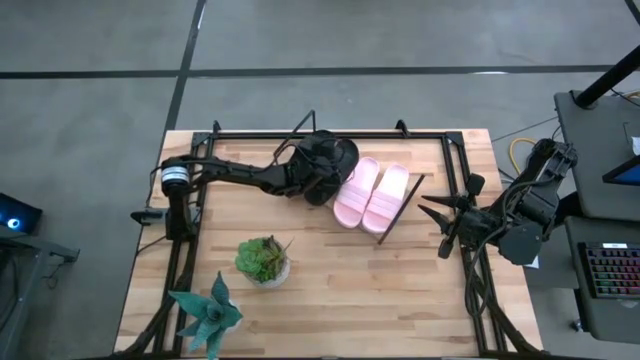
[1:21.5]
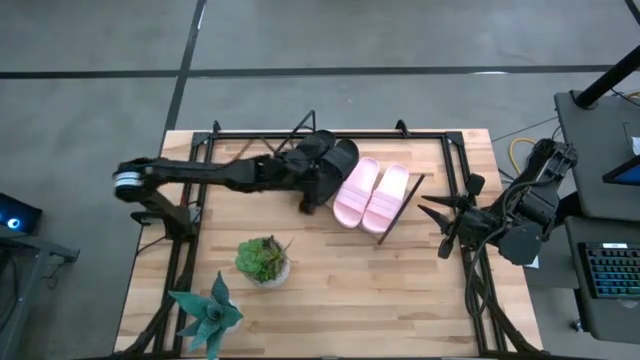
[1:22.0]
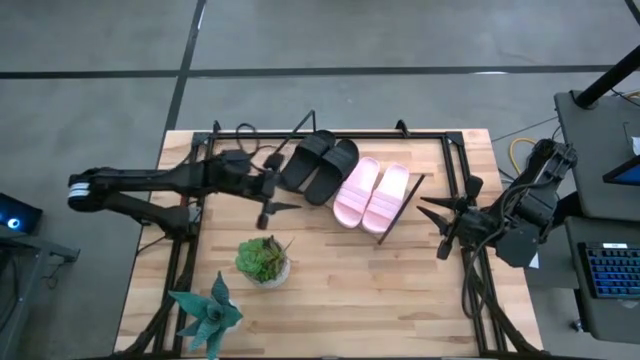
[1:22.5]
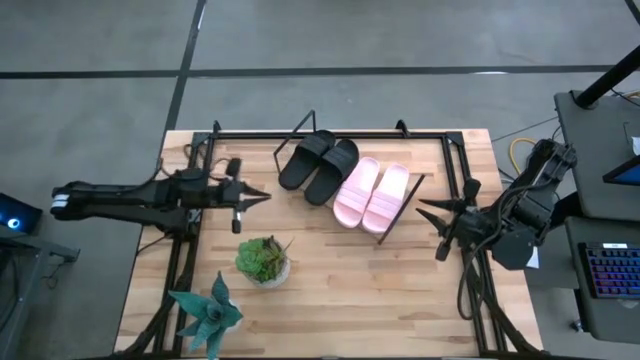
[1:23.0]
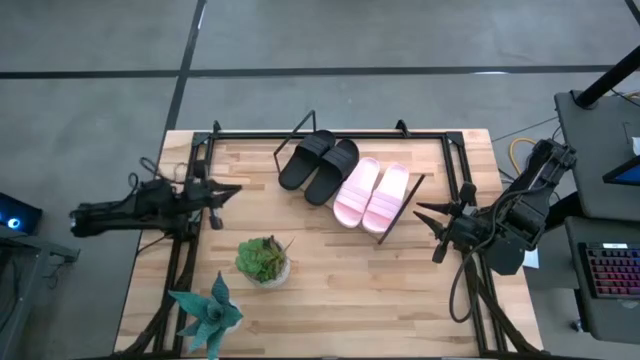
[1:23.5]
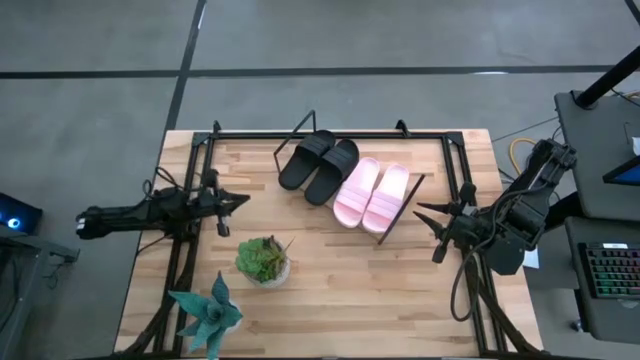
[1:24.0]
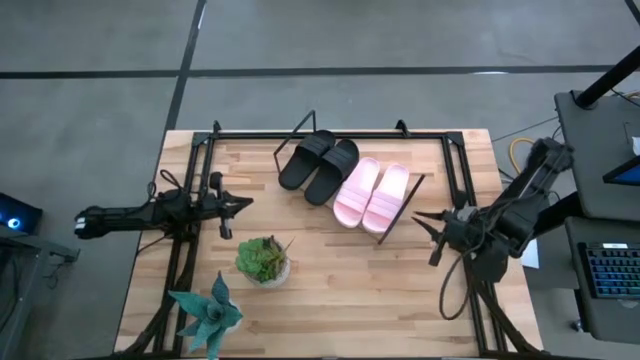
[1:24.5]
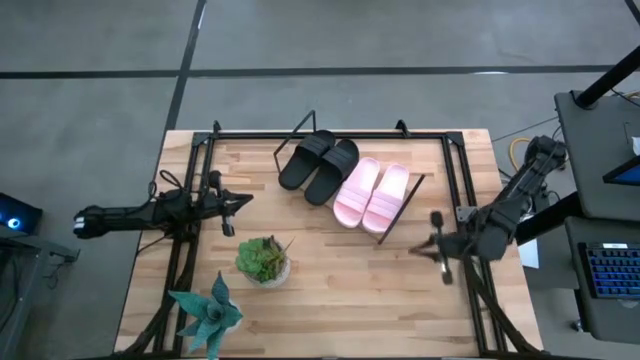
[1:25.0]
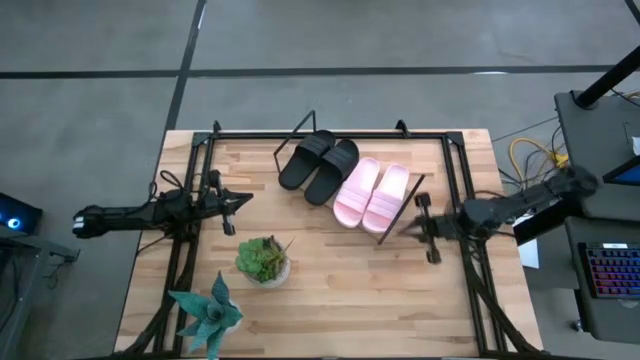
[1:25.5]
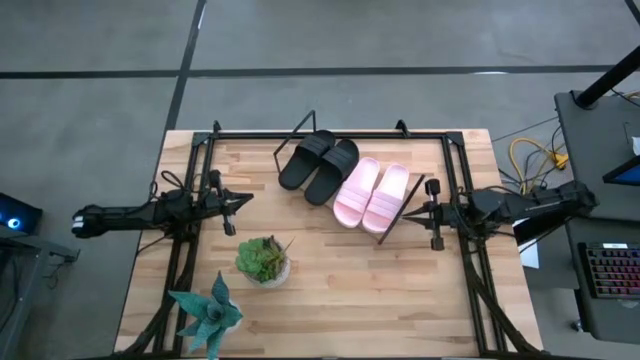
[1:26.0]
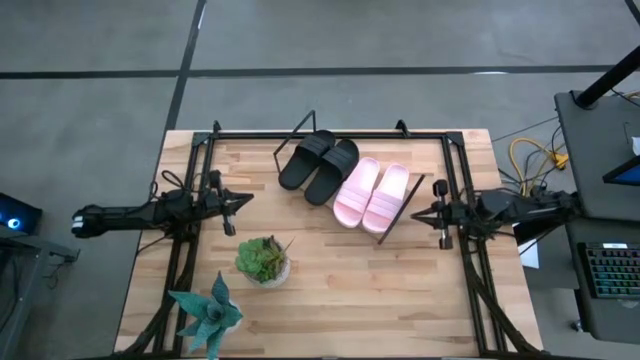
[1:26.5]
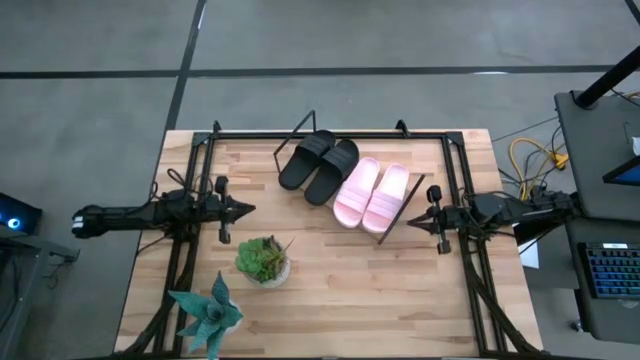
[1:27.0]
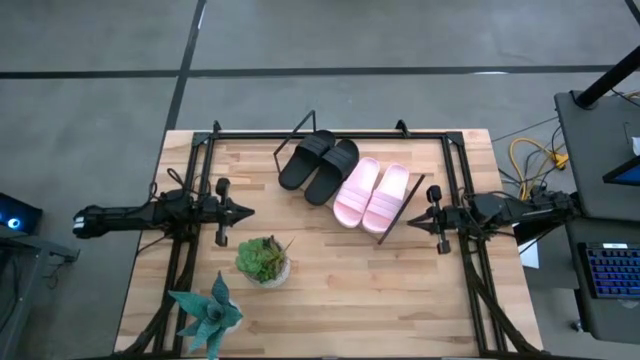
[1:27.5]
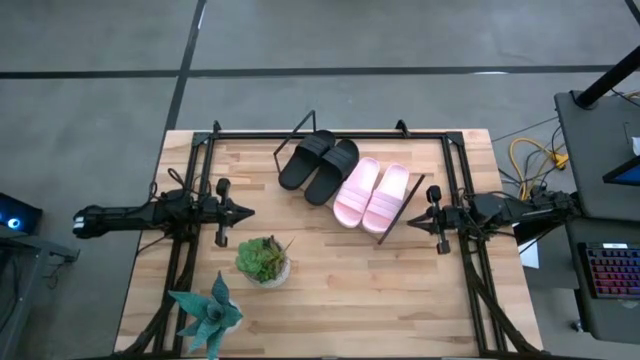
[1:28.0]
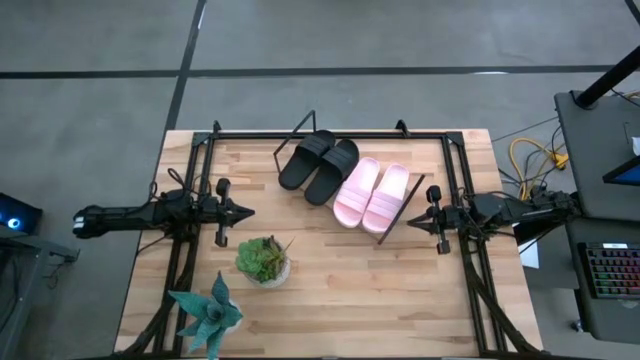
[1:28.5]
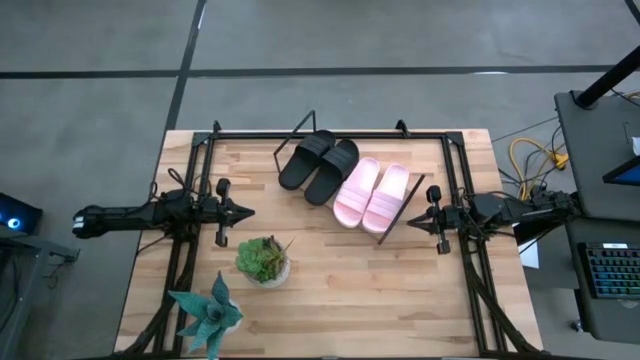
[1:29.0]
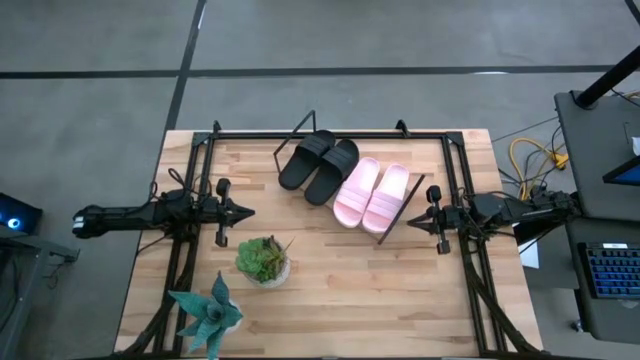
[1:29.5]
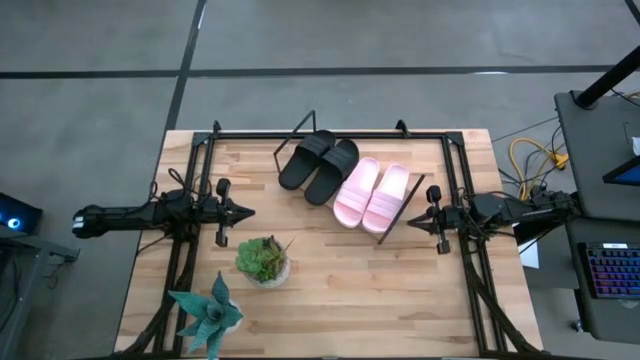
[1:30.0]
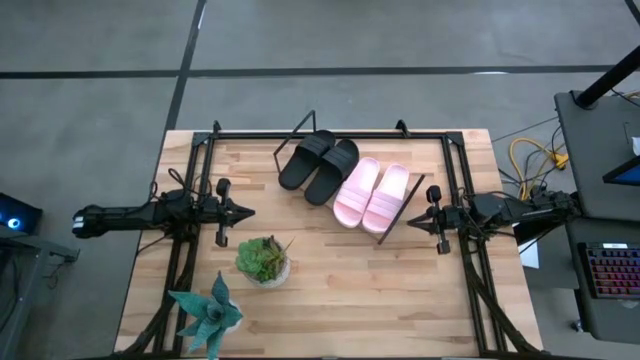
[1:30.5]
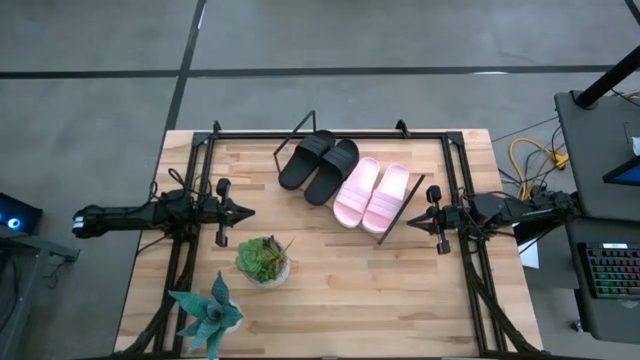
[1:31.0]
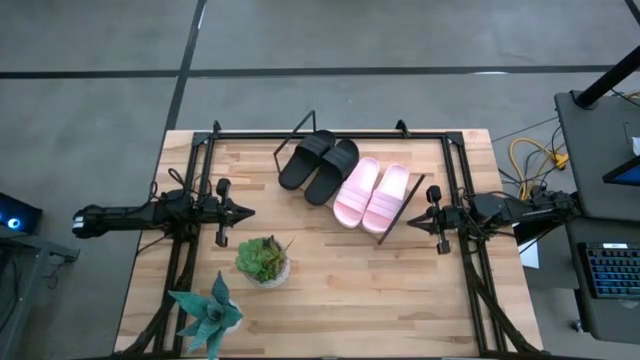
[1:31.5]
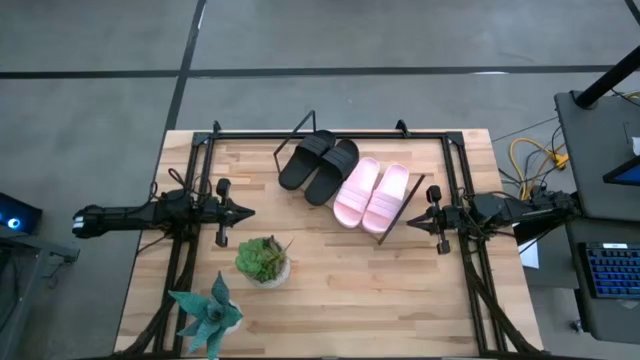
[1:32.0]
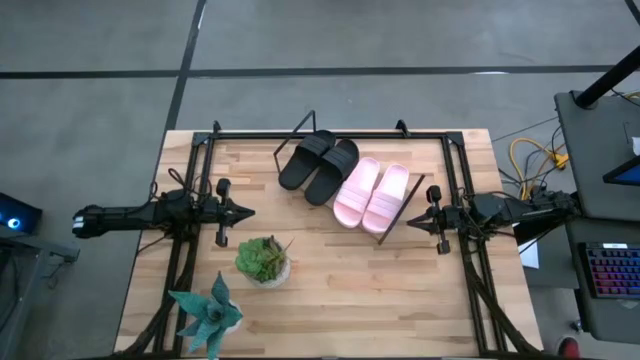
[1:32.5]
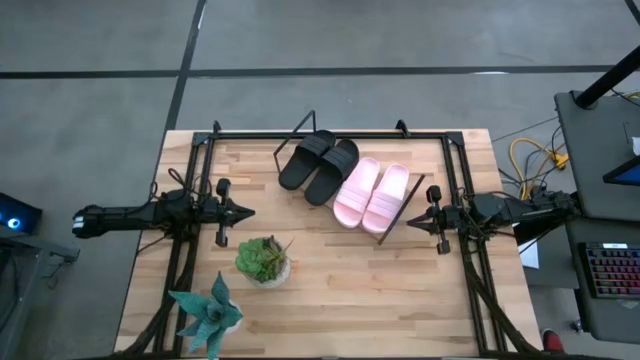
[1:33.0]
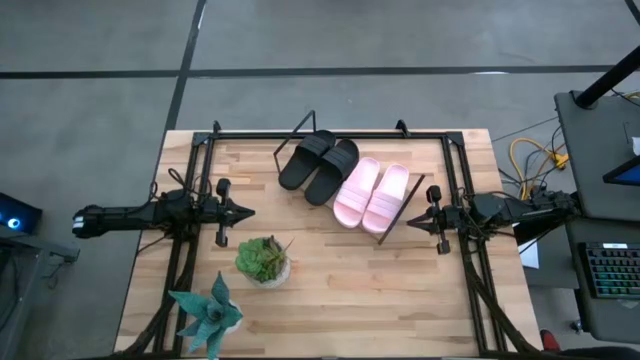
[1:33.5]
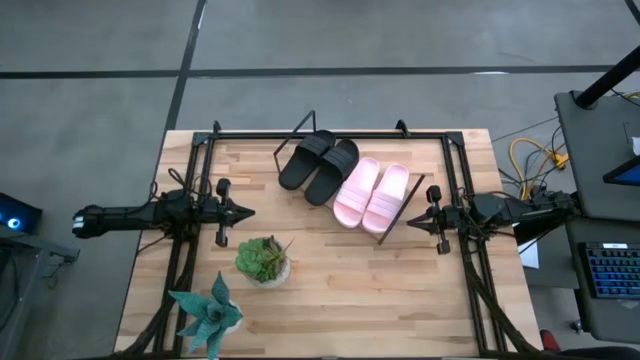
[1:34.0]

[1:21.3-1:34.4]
Task: Pick and place slides into the shelf
Return to Home Position

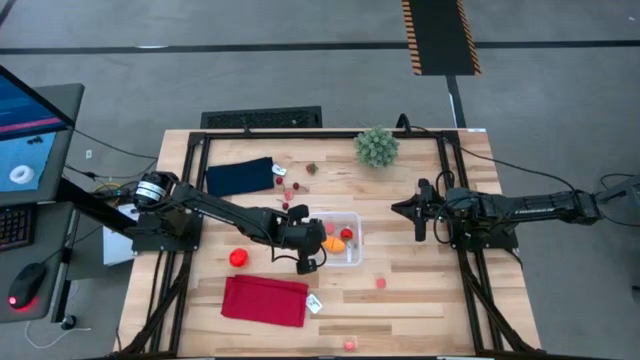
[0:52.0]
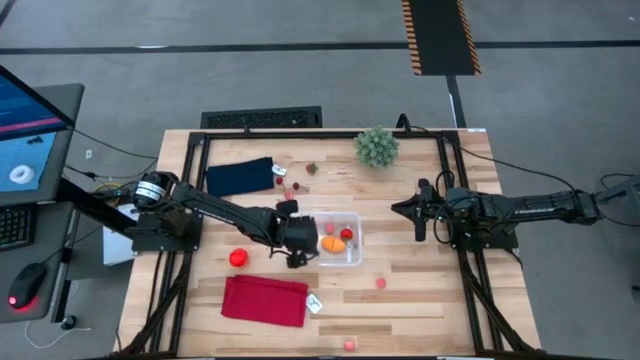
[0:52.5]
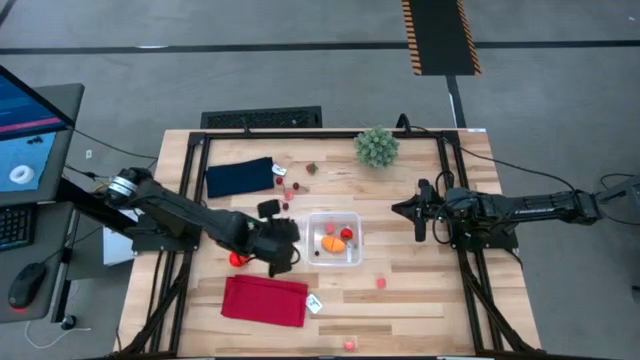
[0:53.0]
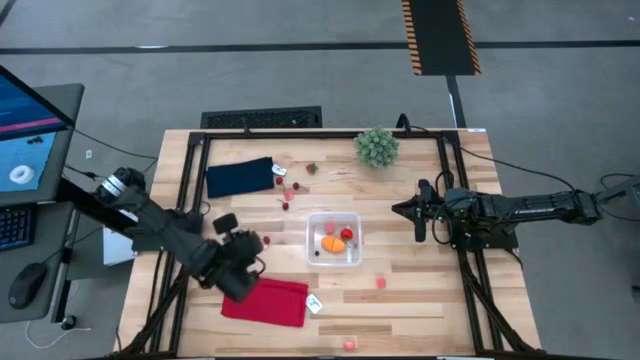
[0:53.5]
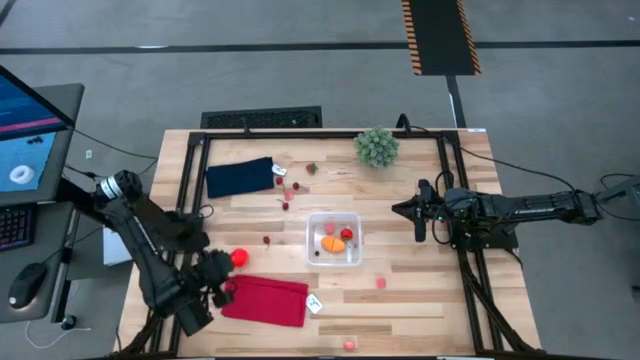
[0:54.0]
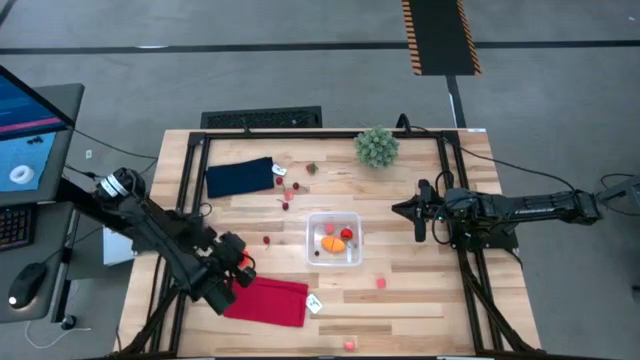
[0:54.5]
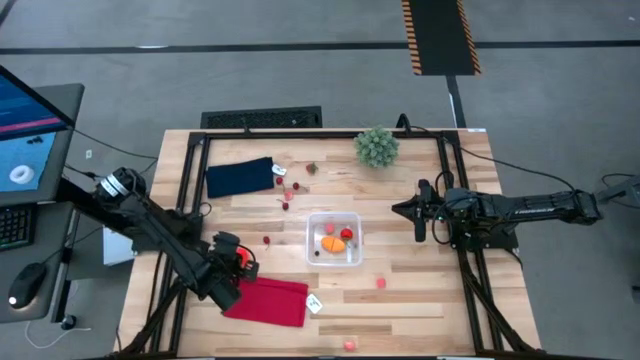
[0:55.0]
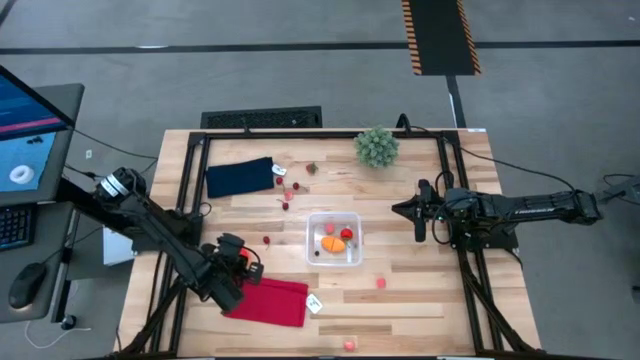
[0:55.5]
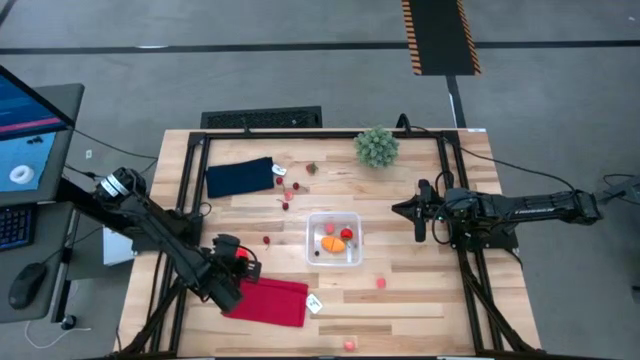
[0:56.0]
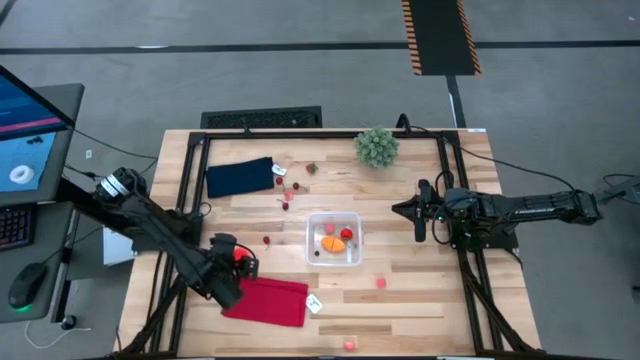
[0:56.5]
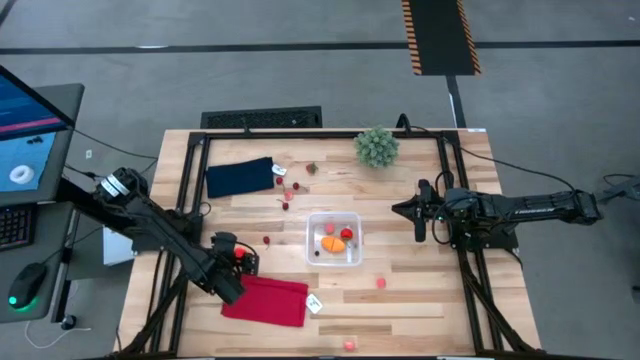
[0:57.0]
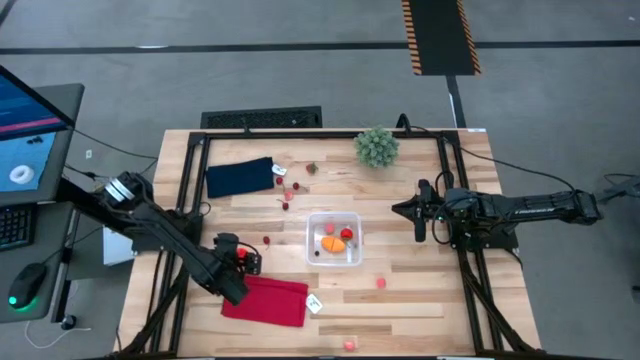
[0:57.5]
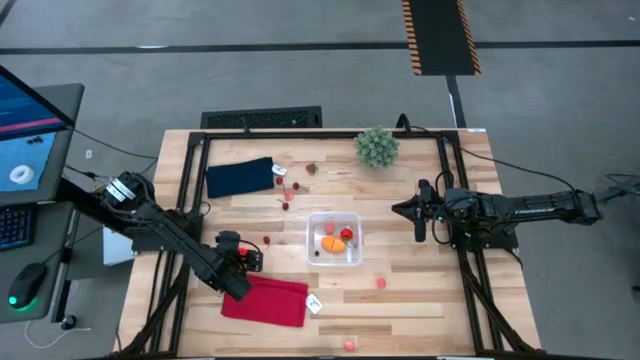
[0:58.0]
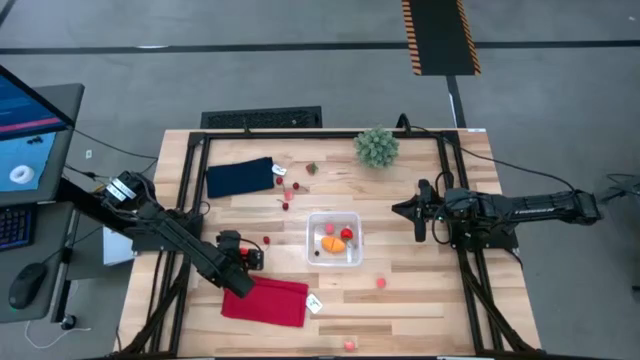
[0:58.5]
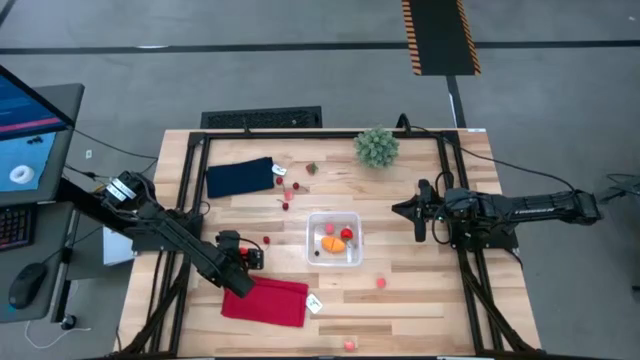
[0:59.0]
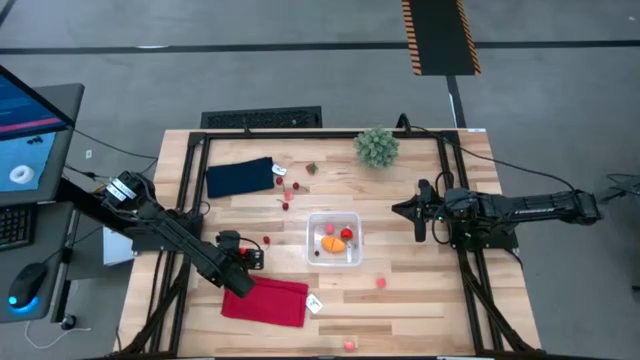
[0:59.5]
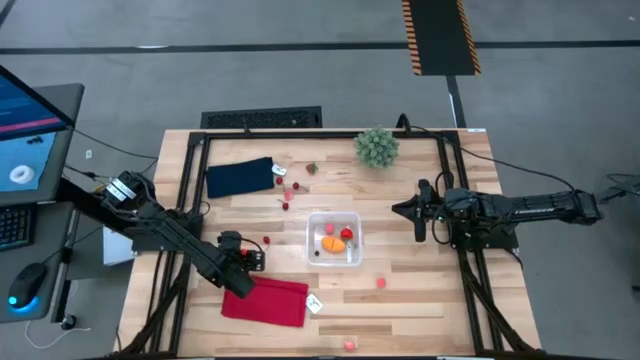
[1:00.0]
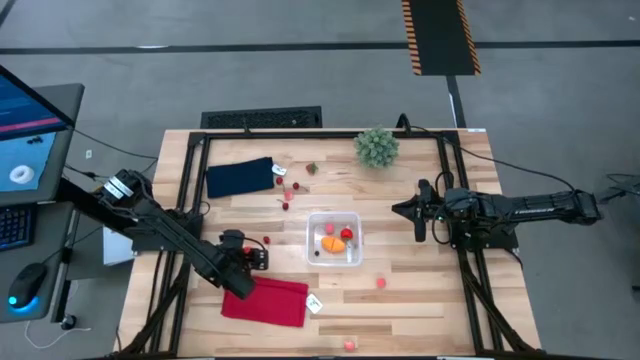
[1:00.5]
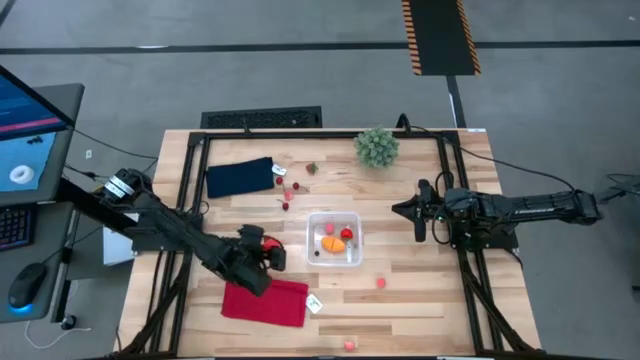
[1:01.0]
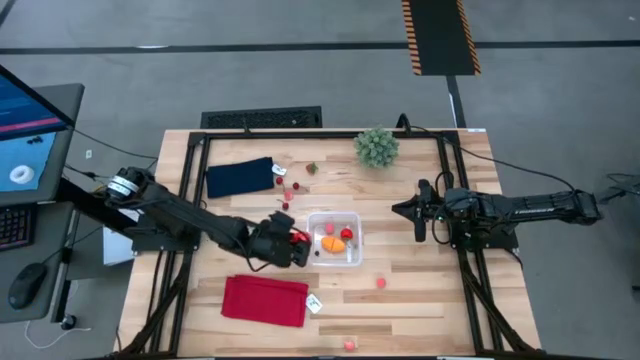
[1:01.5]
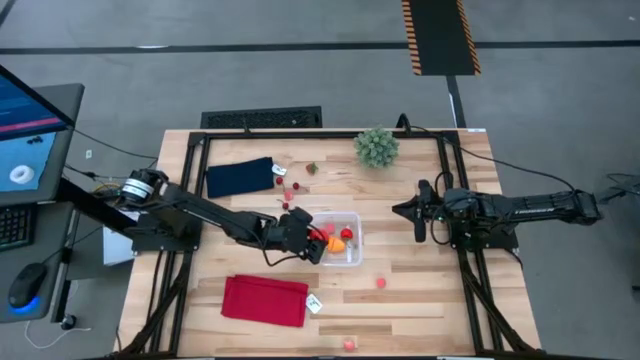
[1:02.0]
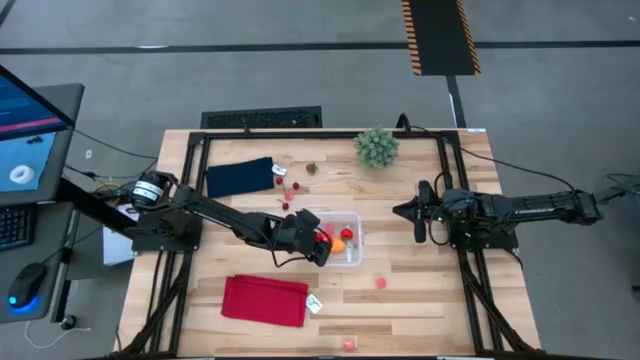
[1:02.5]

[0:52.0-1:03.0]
Task: Pick and placing Produce into tupperware
Put the red apple into the transparent bin
